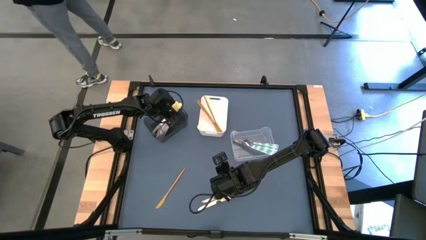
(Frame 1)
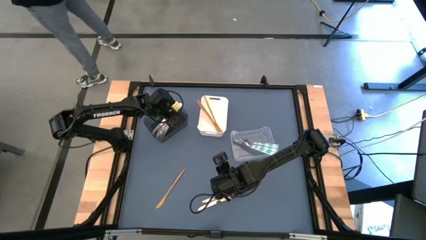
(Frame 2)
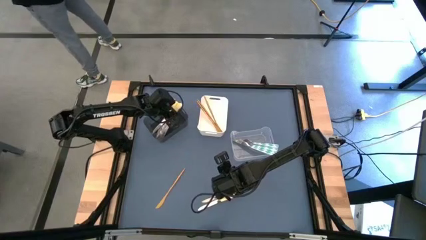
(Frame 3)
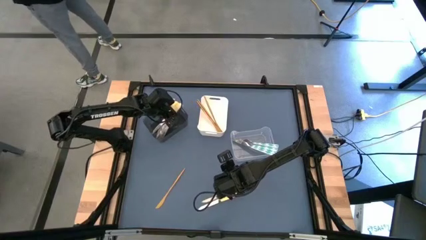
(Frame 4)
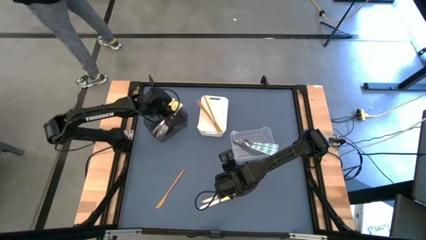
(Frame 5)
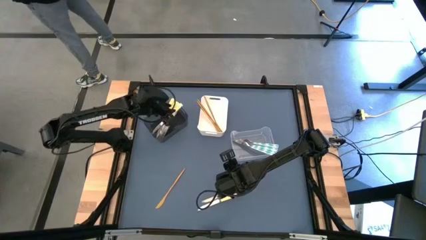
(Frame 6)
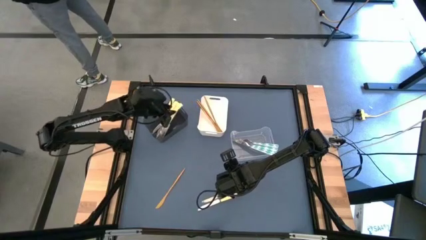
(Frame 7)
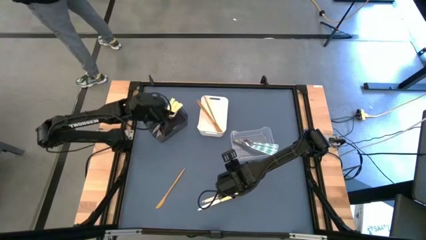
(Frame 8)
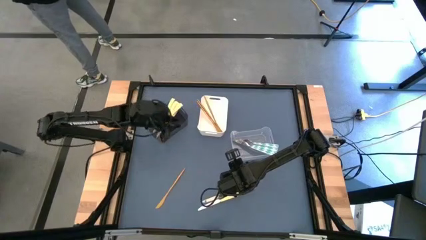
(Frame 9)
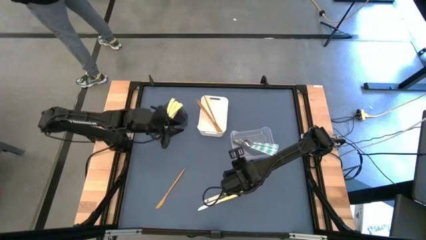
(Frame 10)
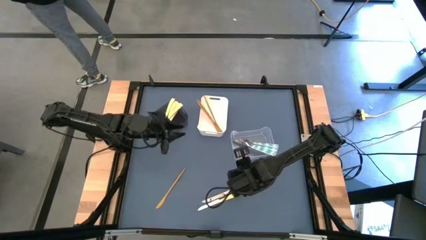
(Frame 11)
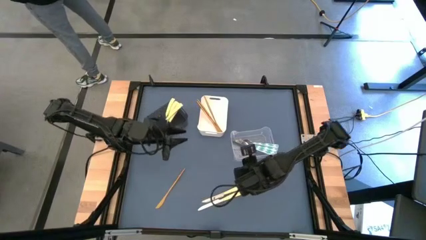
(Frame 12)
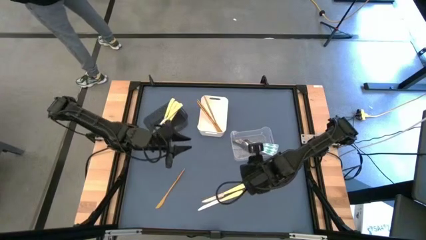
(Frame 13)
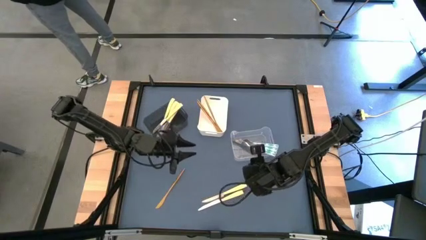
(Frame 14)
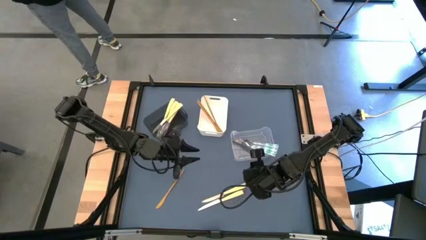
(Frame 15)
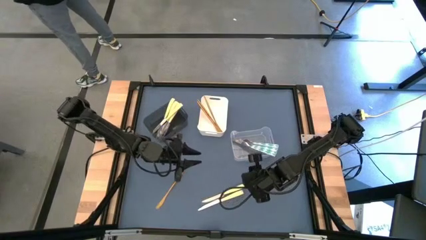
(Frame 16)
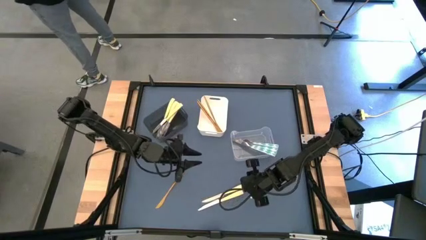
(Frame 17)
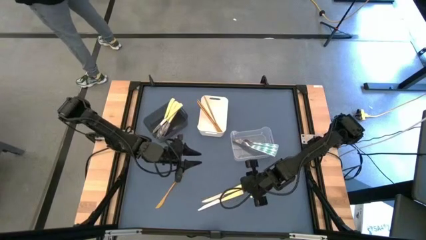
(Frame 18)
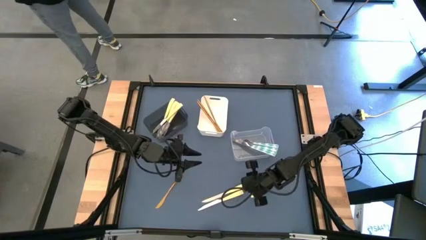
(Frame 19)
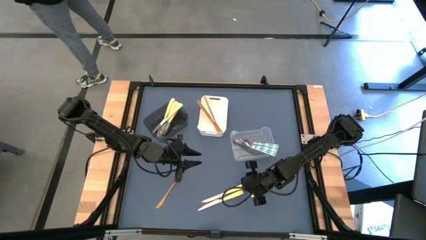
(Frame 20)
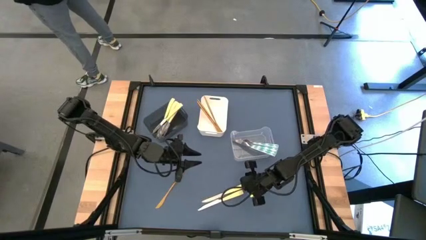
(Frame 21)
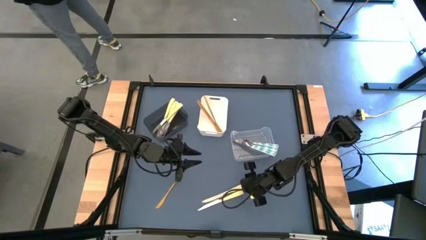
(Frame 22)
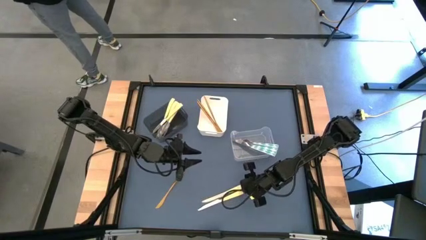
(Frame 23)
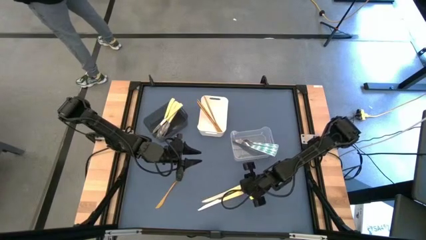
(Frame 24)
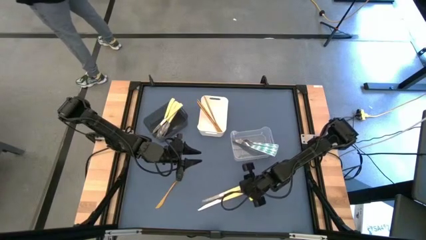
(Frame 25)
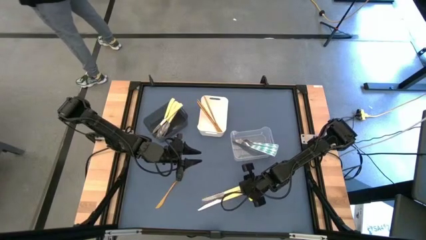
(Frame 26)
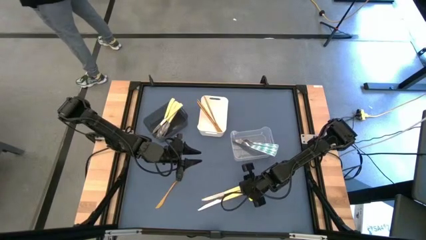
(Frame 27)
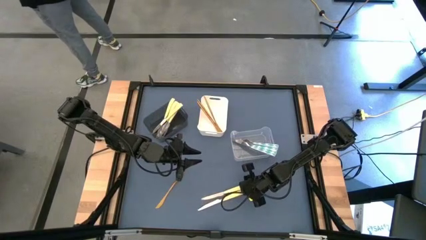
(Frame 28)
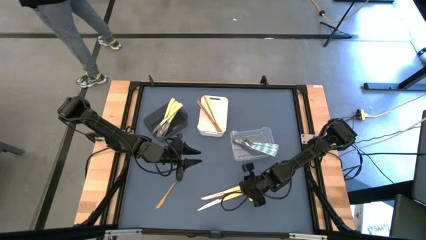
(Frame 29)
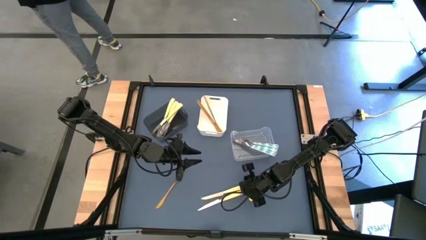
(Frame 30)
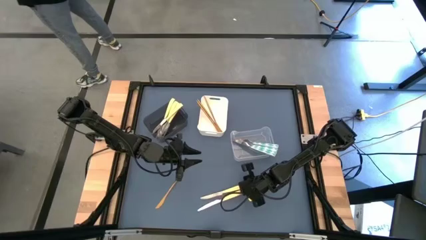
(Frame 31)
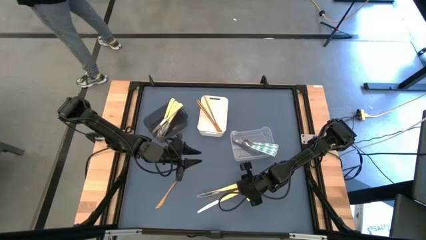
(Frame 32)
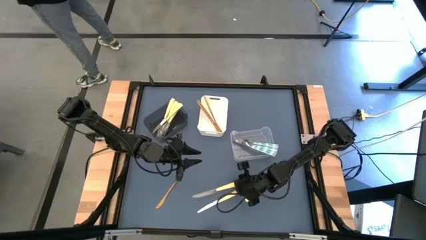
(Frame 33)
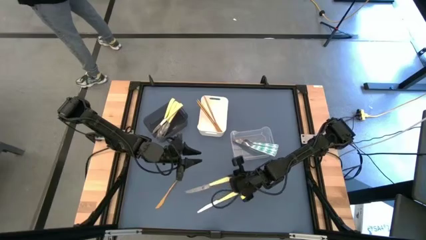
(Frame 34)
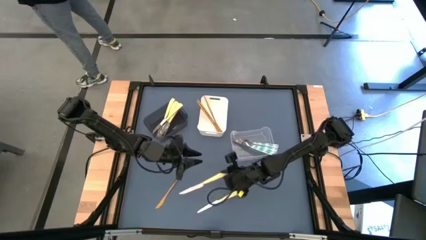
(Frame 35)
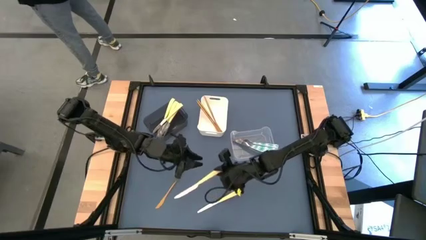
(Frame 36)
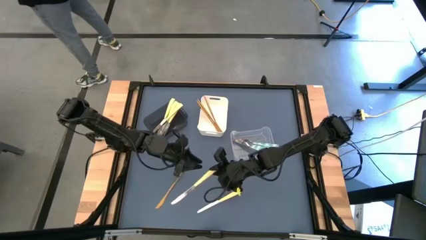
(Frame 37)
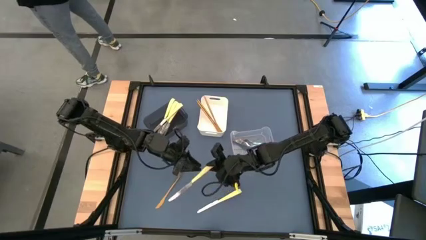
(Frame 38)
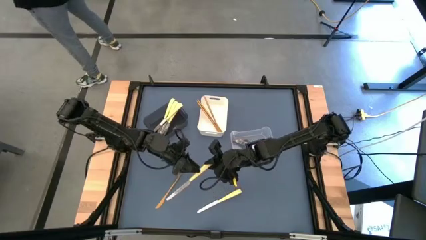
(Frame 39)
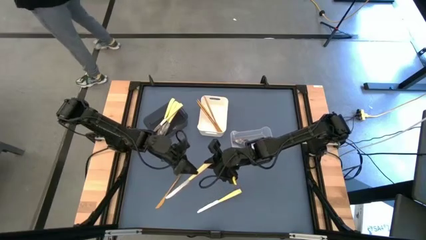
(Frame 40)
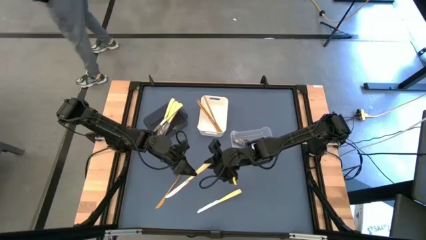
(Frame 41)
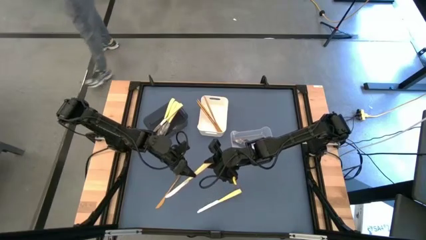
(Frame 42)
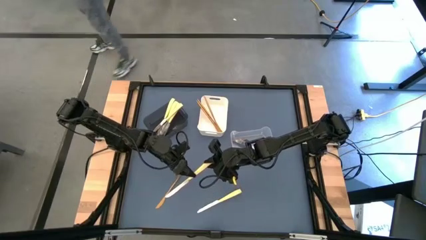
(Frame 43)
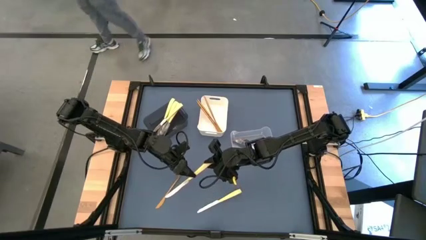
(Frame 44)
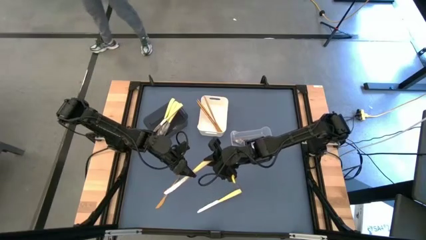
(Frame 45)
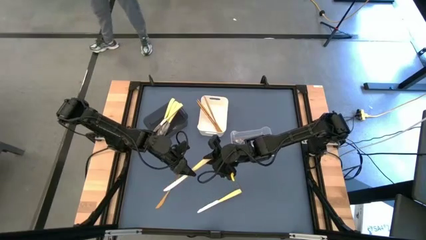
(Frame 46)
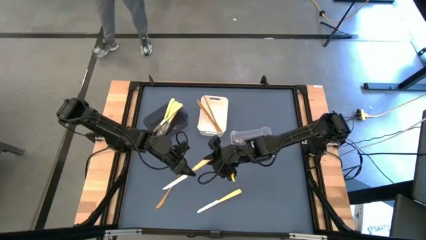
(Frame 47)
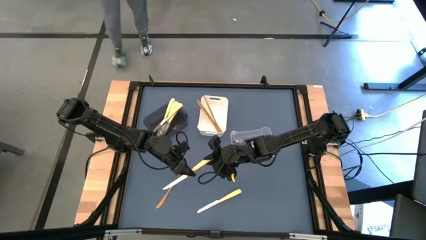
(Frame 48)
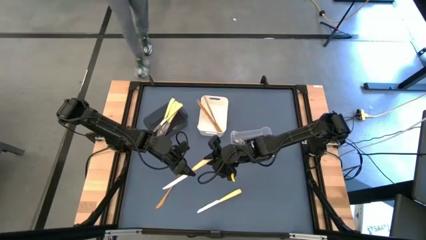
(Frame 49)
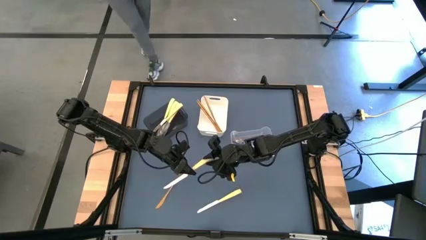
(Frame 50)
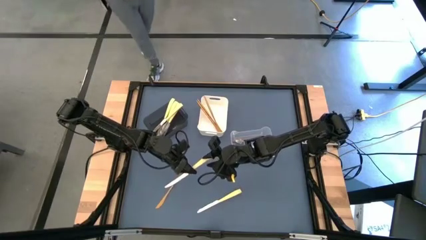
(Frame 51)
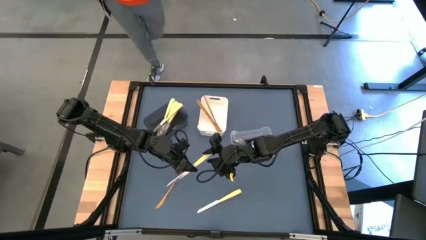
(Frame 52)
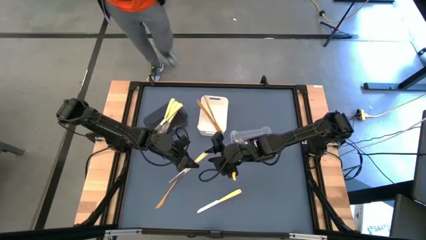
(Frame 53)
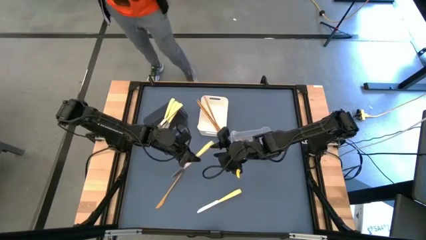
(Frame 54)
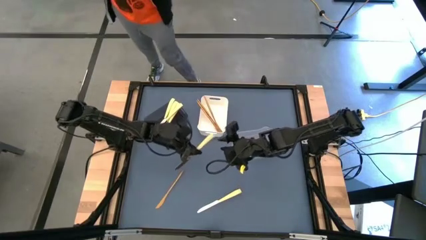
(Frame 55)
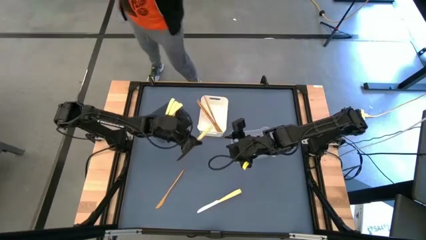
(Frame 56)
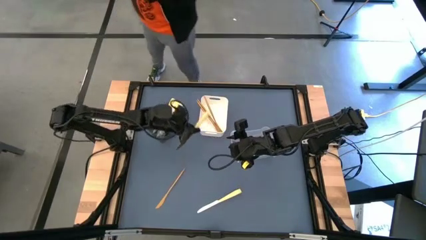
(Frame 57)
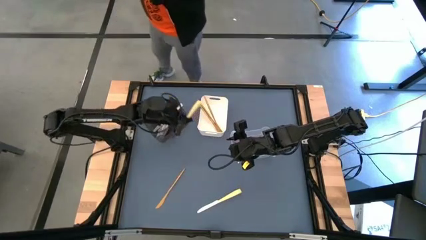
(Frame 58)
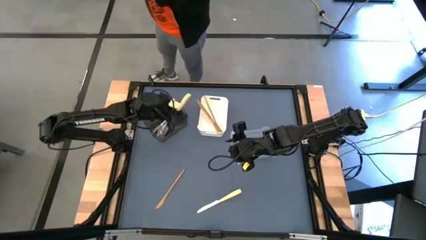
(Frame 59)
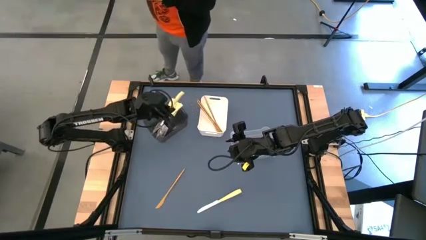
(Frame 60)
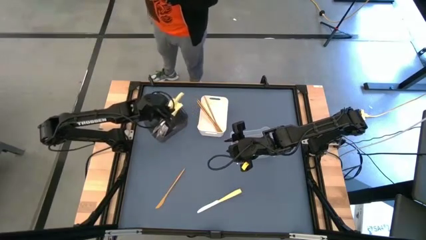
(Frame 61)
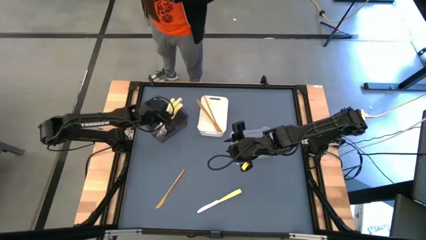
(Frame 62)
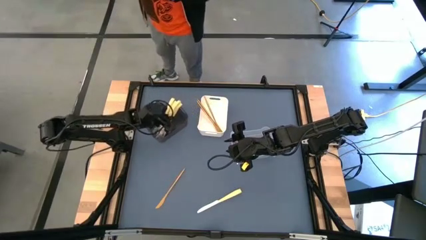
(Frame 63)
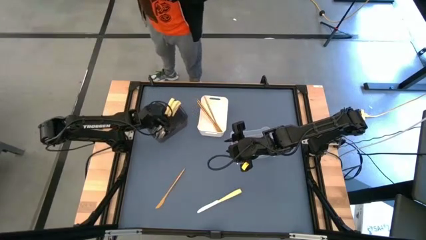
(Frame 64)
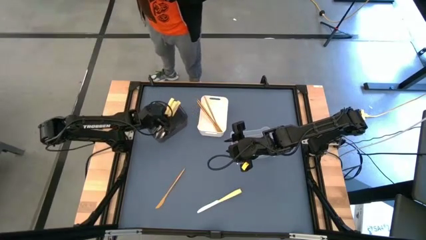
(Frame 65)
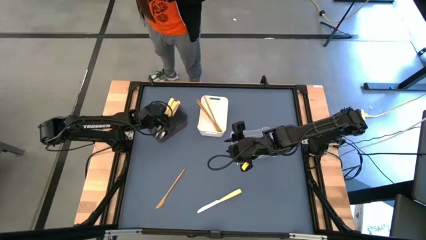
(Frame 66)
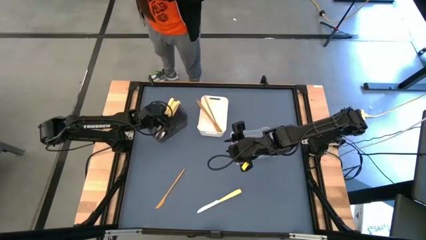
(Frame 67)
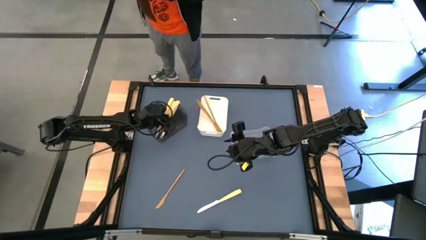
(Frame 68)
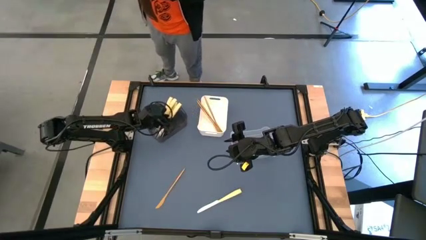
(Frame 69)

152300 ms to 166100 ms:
Task: Sort silverware by color (type)
Put the yellow knife into the black bin

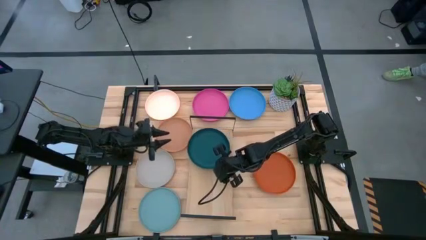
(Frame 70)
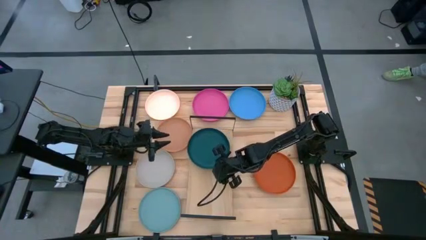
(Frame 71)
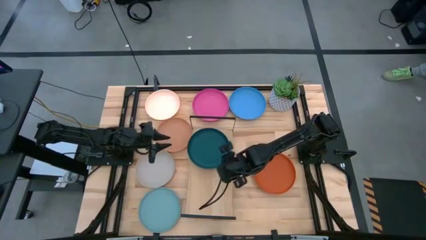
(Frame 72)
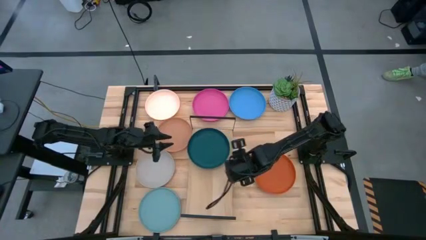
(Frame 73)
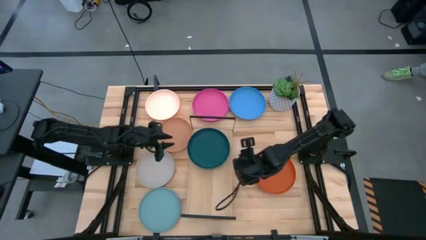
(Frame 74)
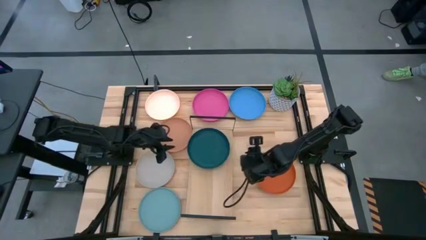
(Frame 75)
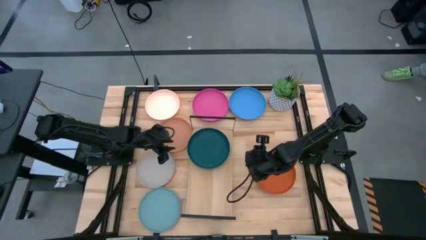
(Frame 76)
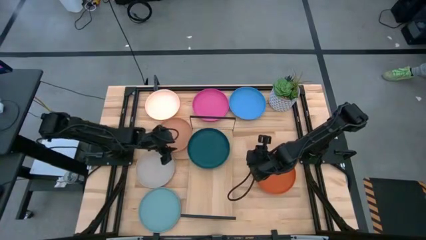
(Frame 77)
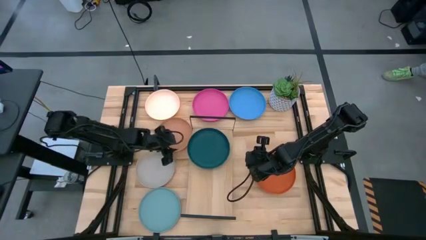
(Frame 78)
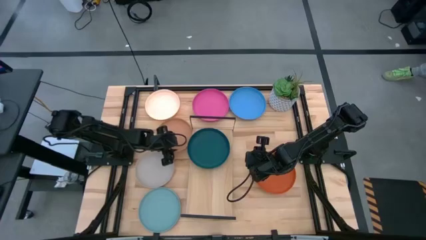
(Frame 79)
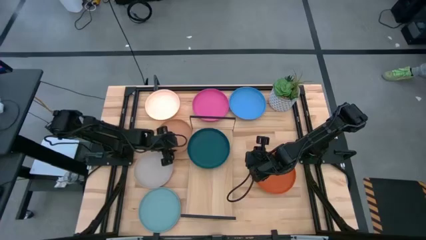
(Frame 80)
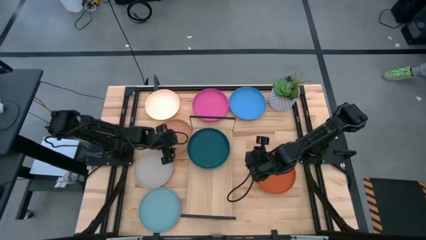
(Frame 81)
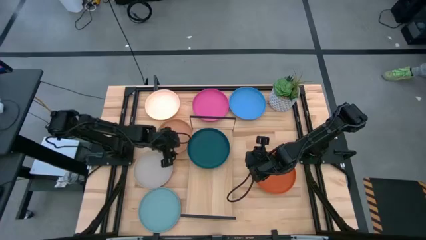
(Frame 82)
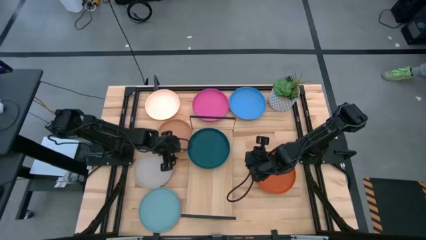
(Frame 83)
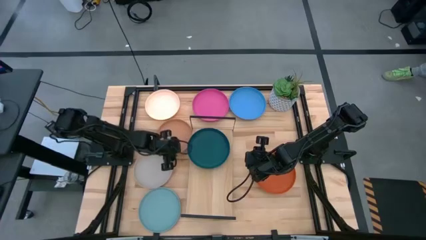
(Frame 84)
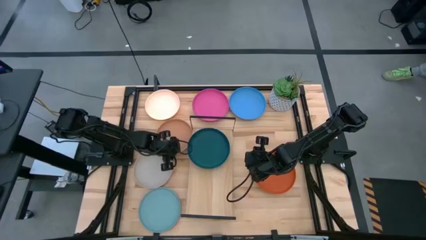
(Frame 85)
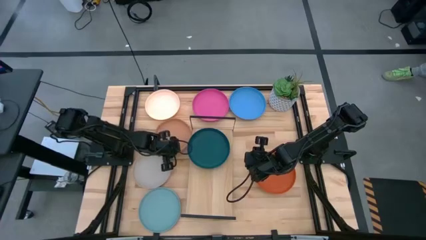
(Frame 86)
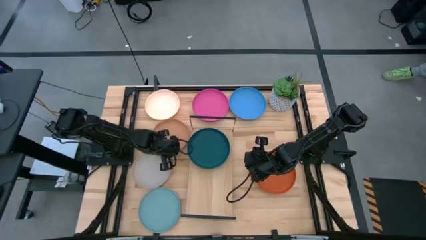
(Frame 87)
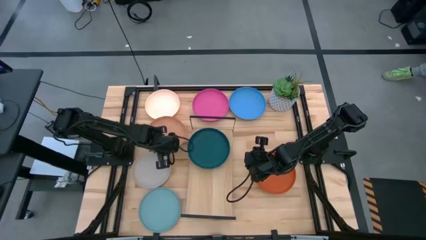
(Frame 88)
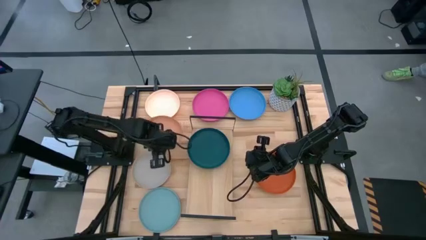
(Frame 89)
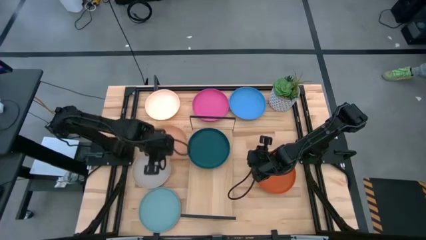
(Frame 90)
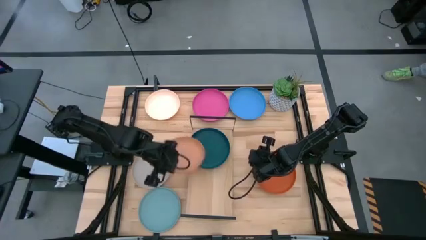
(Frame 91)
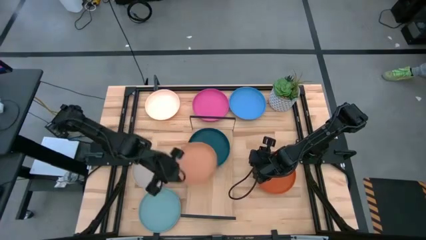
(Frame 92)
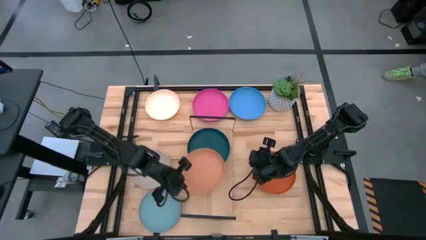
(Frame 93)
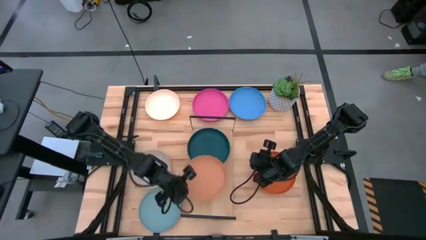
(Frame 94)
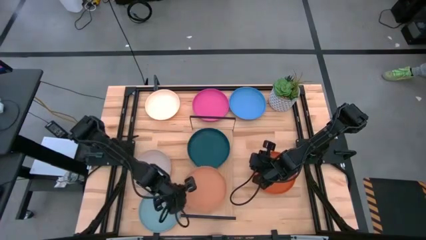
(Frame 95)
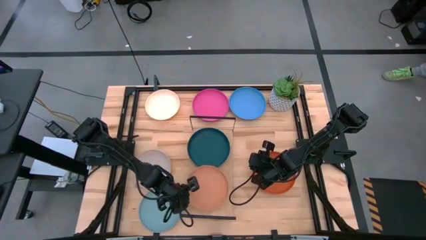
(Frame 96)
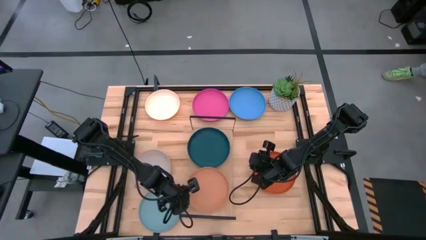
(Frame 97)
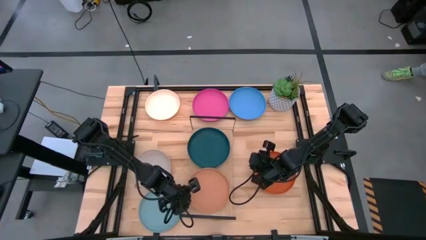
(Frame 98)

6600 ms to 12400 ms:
Task: Place and stack plates onto a shelf
Put the brown plate on the shelf
